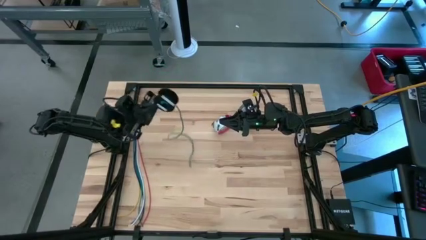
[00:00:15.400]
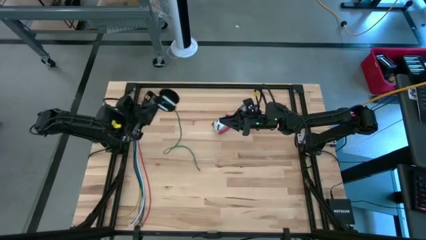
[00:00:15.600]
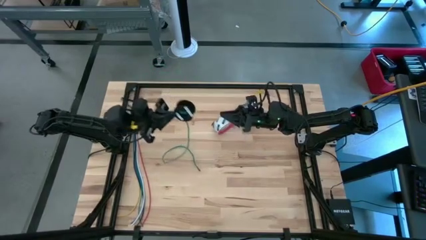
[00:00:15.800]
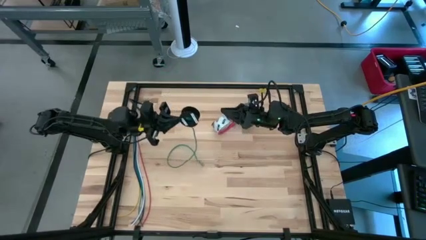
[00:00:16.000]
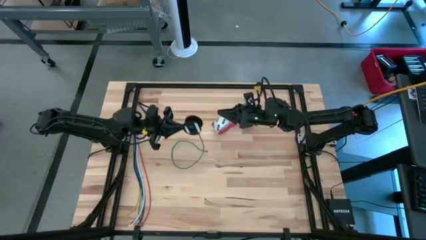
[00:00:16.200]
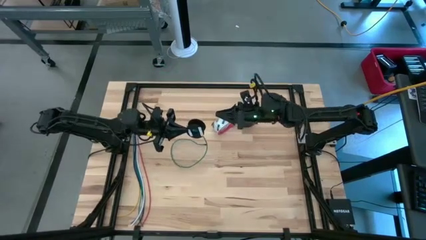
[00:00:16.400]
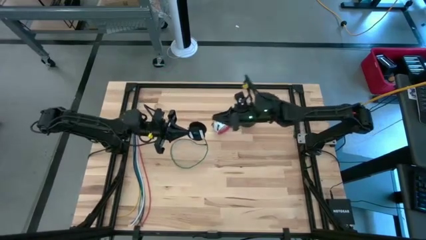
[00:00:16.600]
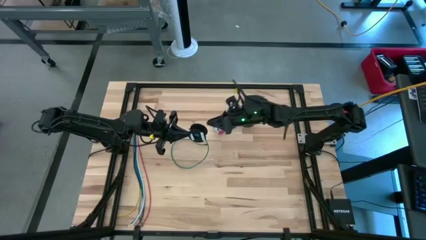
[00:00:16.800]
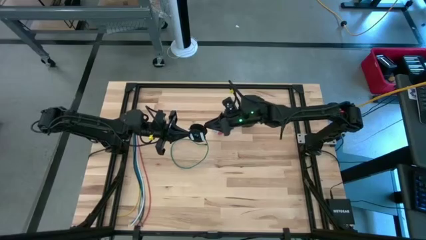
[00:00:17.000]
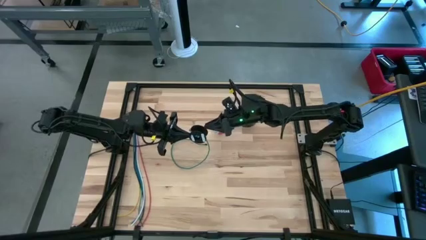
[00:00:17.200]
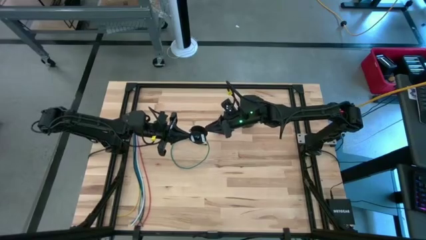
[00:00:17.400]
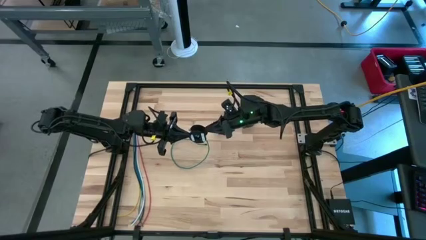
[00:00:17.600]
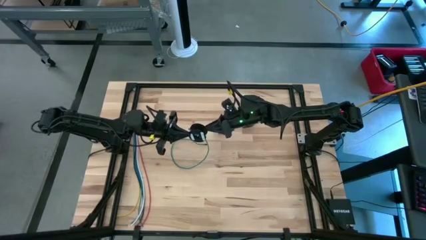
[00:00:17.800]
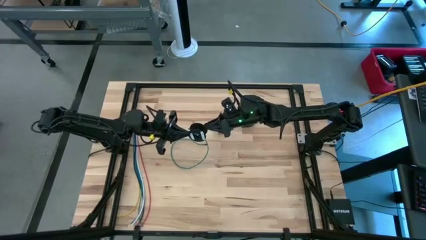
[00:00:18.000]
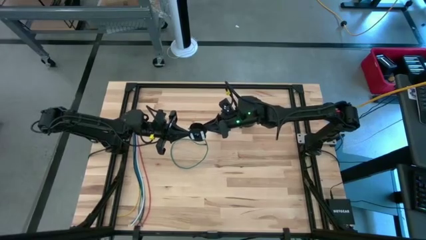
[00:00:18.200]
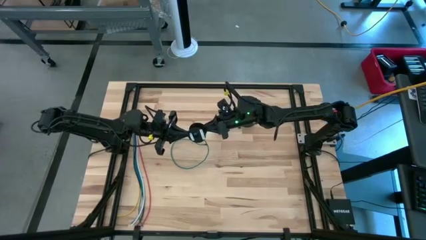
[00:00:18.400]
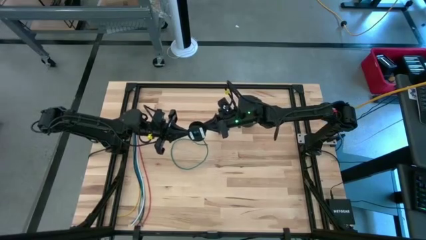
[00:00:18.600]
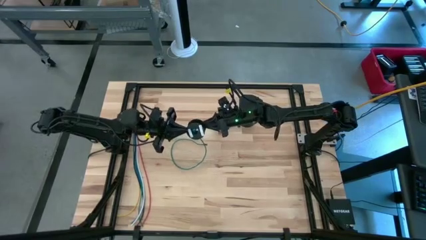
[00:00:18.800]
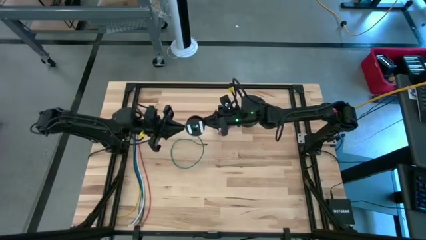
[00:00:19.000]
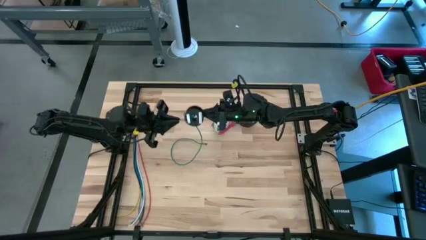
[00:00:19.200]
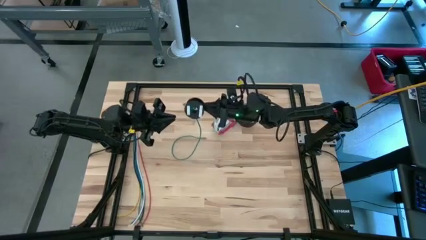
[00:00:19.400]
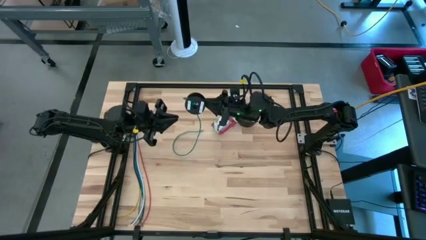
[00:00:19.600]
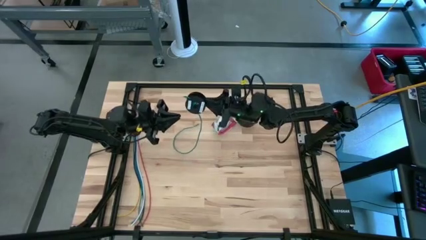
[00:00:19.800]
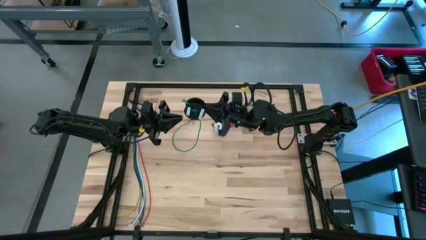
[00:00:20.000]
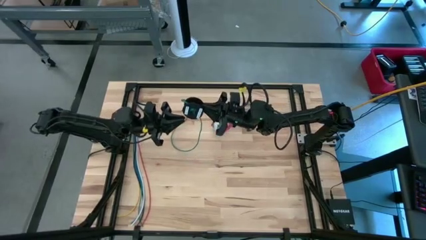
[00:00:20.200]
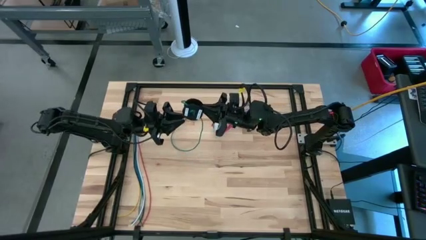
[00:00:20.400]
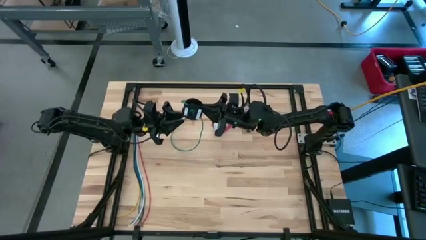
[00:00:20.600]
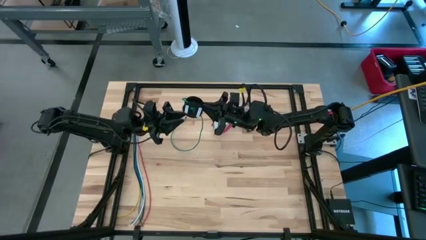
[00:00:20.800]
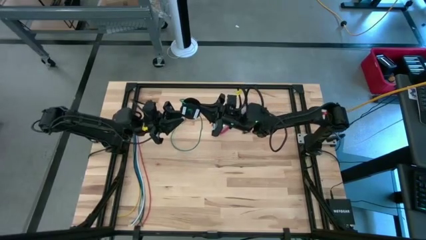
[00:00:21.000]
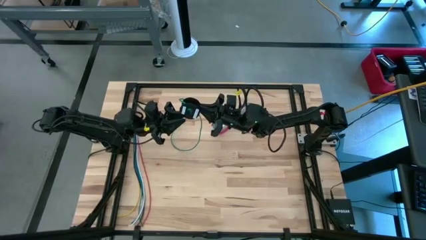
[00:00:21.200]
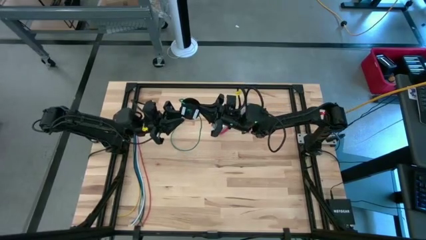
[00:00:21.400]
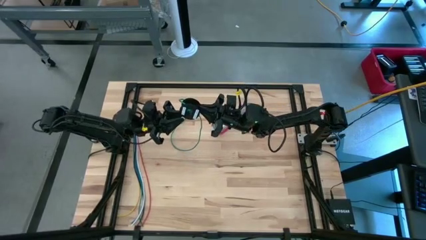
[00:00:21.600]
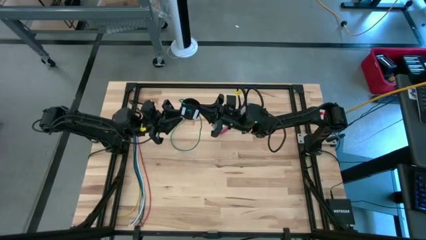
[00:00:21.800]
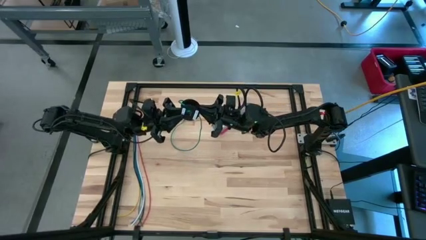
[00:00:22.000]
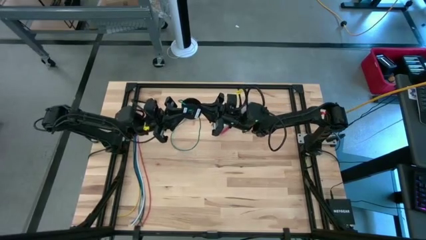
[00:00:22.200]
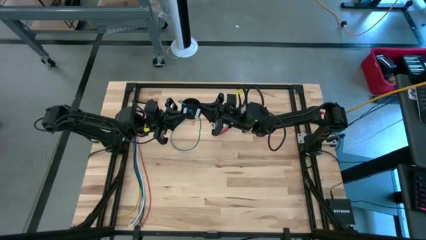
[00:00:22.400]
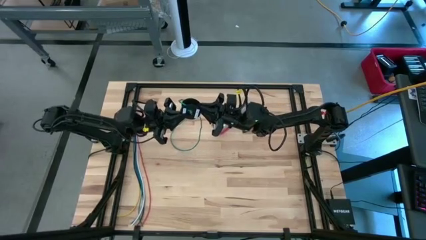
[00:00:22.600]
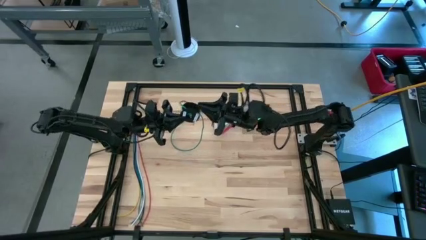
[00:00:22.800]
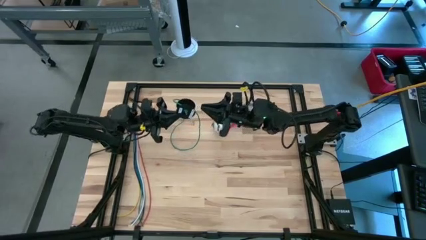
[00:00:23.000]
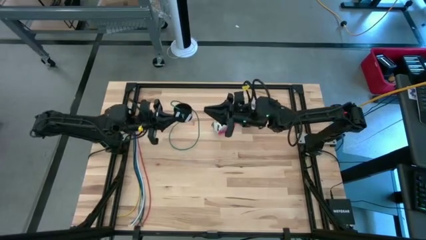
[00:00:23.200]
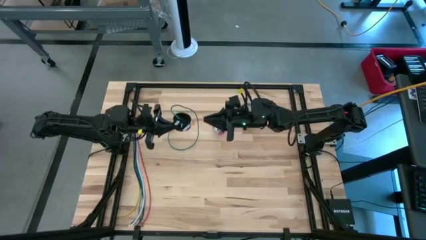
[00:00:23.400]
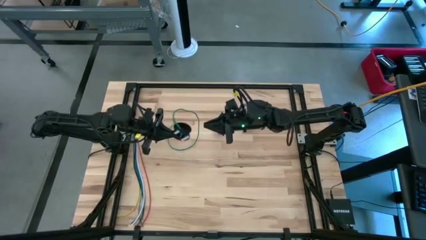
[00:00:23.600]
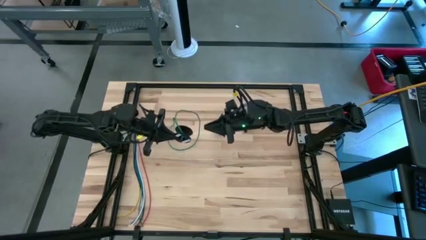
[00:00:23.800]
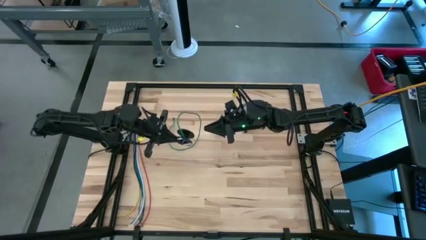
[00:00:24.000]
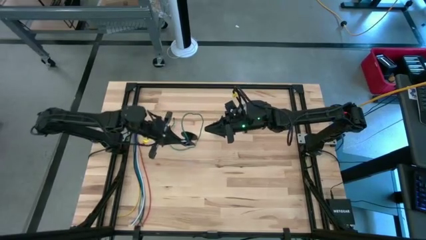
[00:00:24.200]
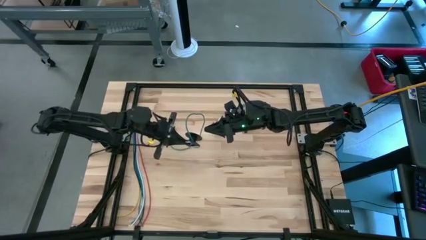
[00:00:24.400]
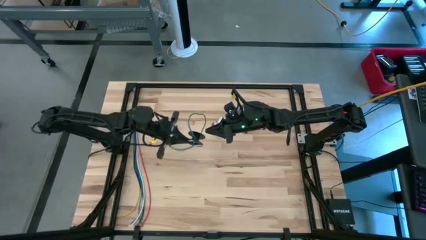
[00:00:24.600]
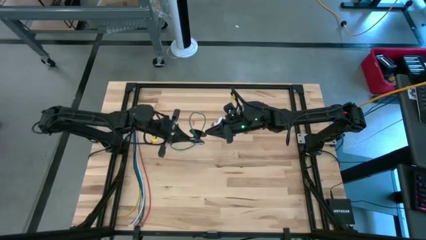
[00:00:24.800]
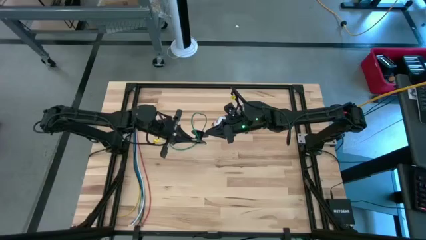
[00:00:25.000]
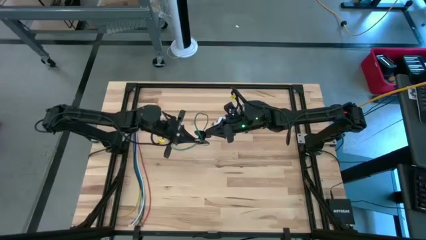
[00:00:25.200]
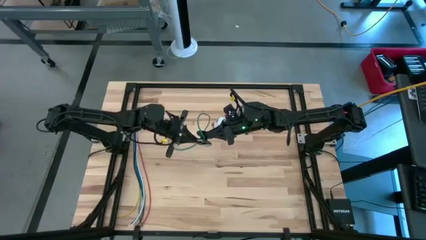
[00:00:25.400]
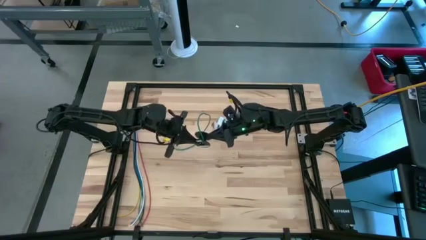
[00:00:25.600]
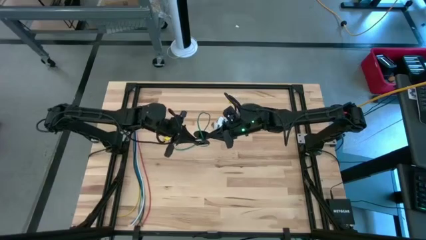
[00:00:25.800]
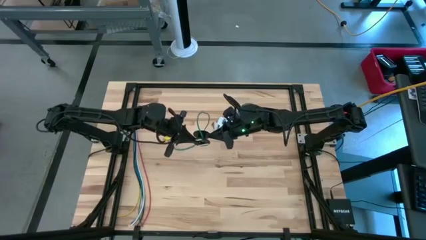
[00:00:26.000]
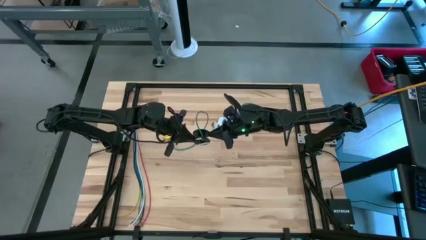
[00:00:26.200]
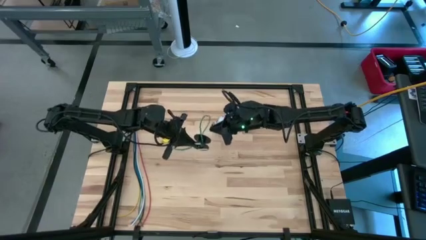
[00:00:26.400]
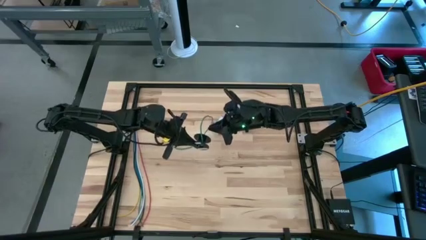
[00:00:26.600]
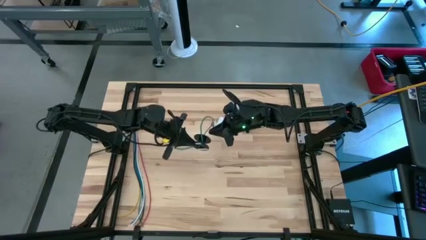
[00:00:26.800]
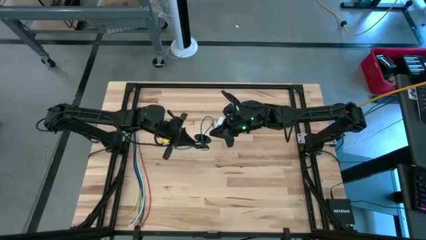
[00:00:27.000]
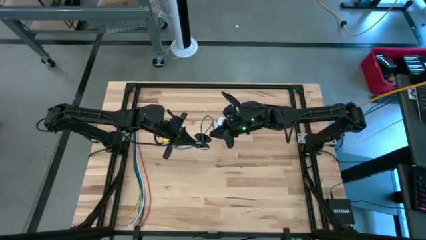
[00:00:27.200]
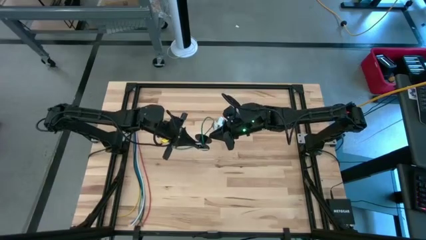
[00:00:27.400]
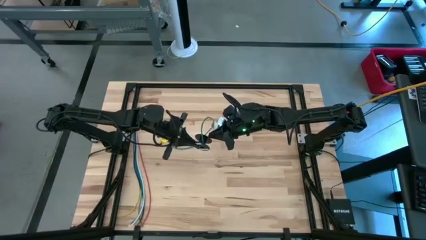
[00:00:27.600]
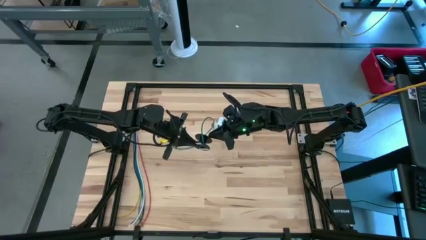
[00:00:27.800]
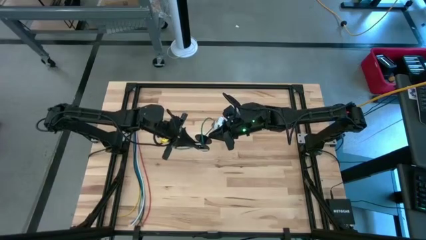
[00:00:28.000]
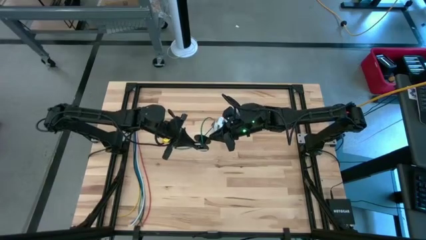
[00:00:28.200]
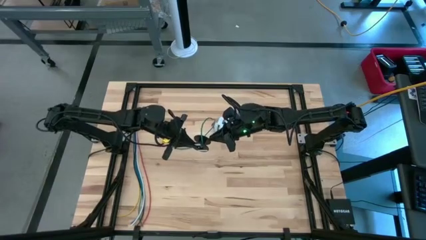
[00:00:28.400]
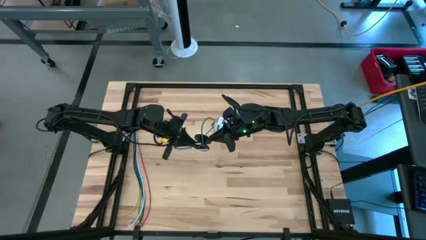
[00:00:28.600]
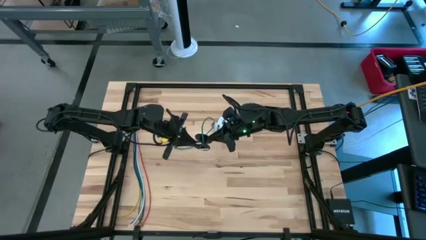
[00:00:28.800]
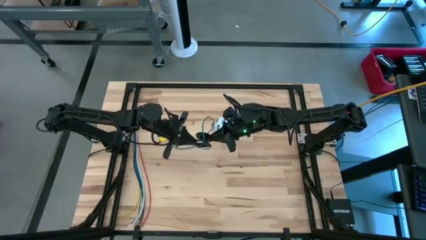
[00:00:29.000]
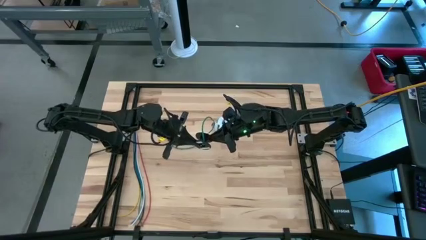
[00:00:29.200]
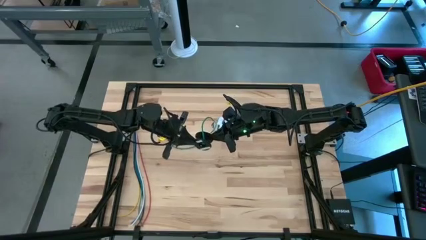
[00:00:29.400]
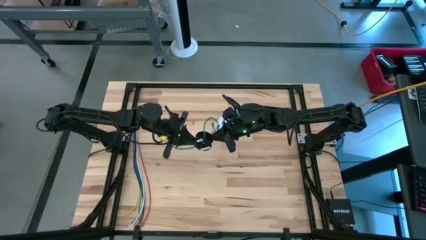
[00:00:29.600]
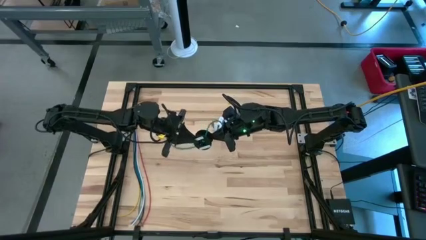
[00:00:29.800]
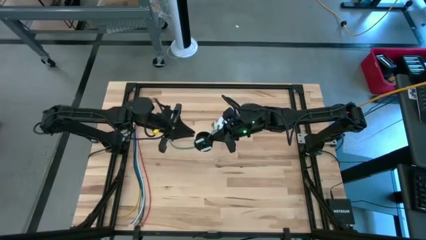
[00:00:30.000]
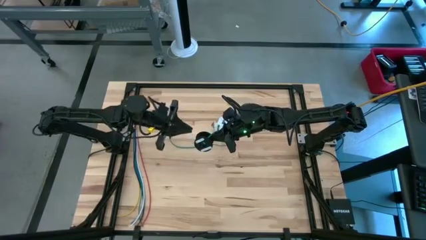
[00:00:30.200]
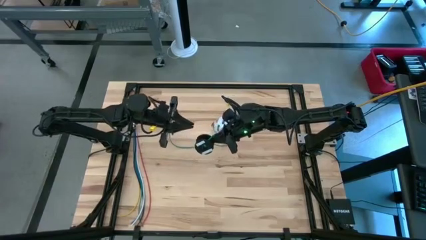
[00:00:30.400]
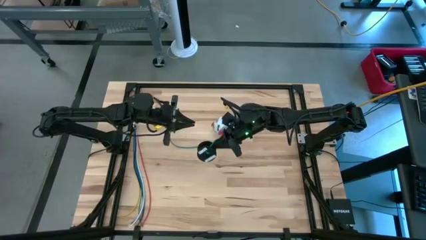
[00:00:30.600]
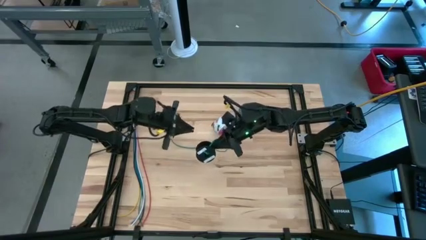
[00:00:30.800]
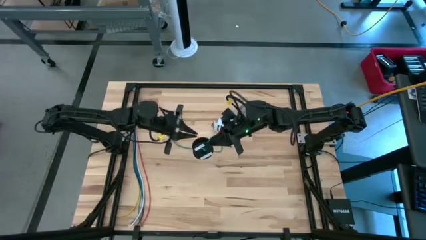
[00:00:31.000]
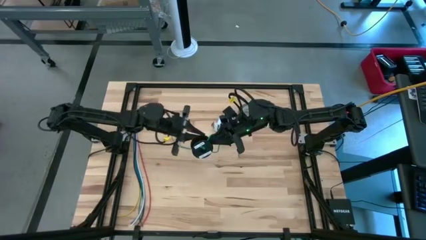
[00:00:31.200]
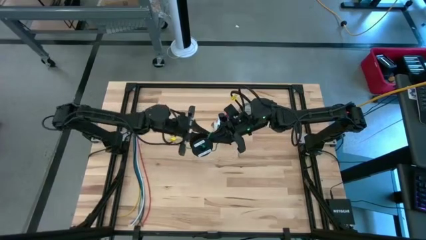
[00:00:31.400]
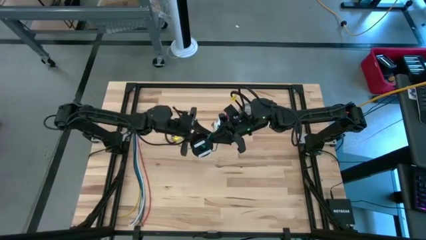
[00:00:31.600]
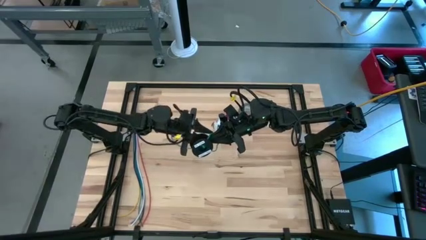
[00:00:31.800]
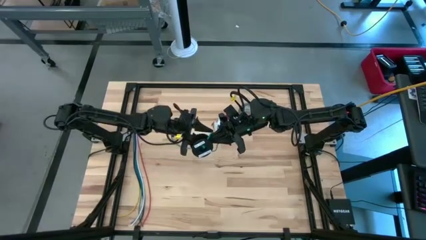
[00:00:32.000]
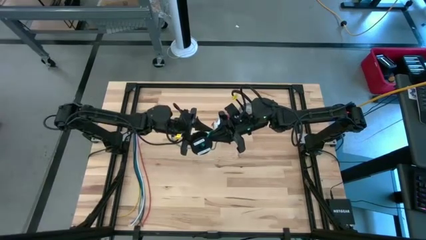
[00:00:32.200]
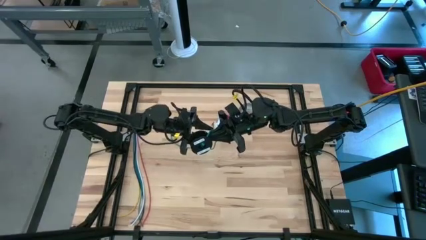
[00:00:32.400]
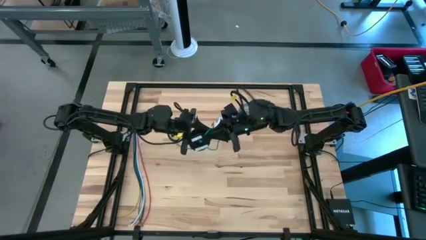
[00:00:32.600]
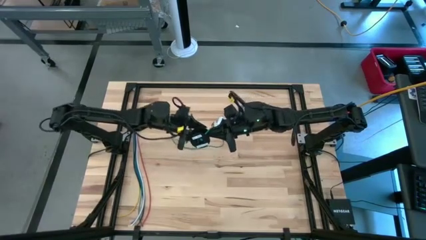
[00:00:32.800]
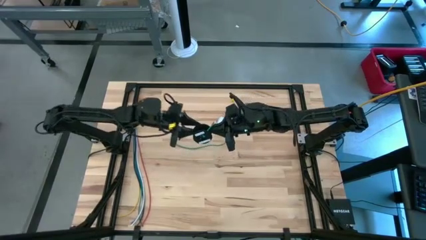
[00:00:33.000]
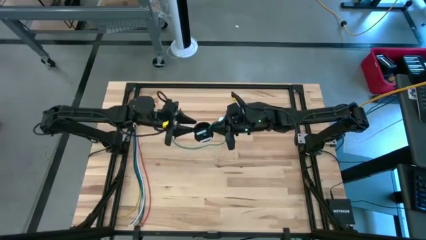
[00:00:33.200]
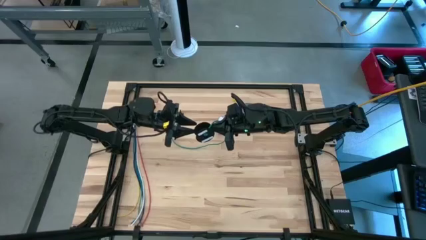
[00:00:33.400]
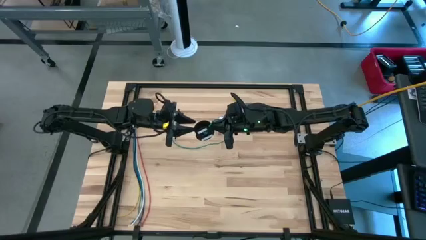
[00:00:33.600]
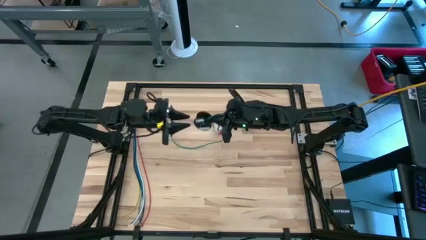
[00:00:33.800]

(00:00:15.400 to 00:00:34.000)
Task: Coil cords
Coil the green wire on the spool
